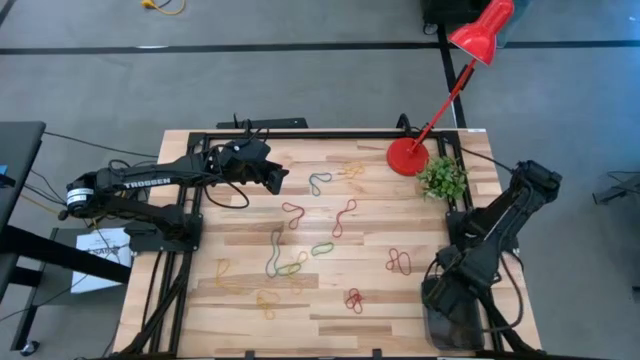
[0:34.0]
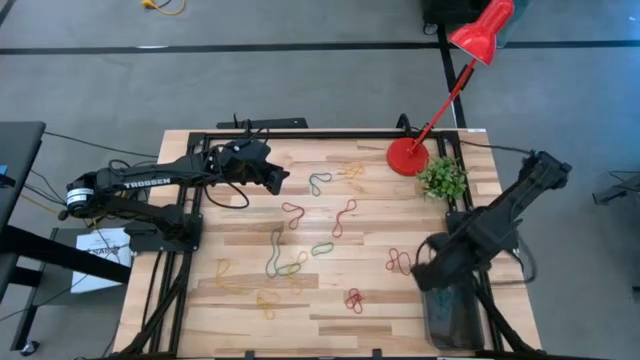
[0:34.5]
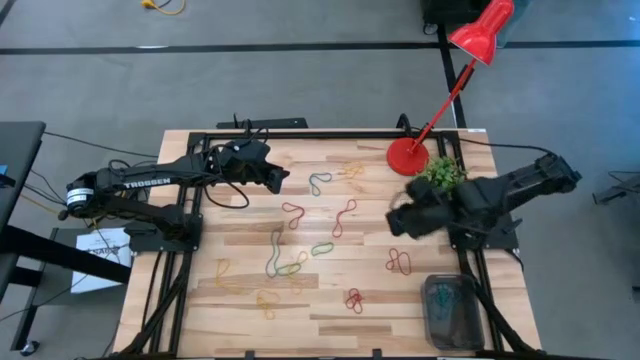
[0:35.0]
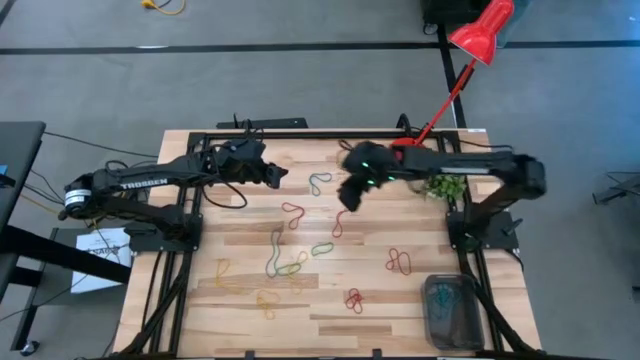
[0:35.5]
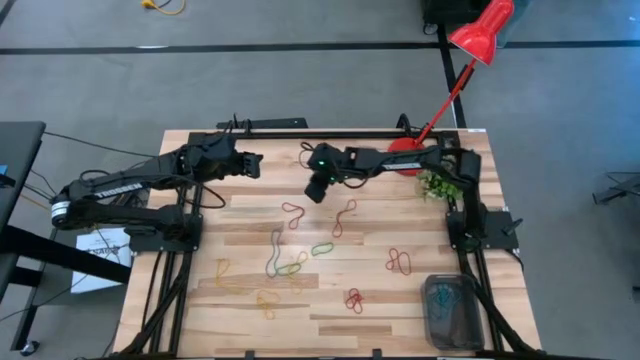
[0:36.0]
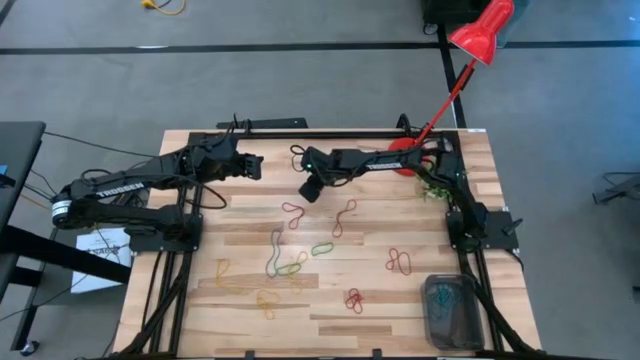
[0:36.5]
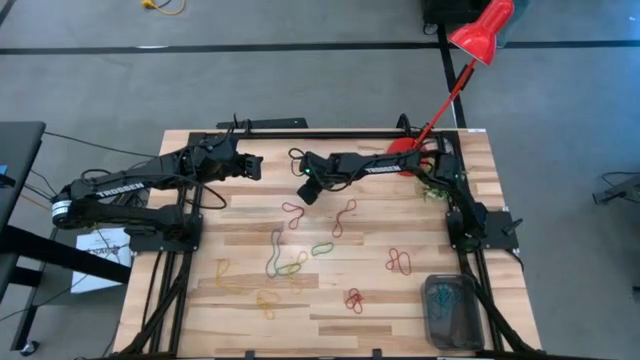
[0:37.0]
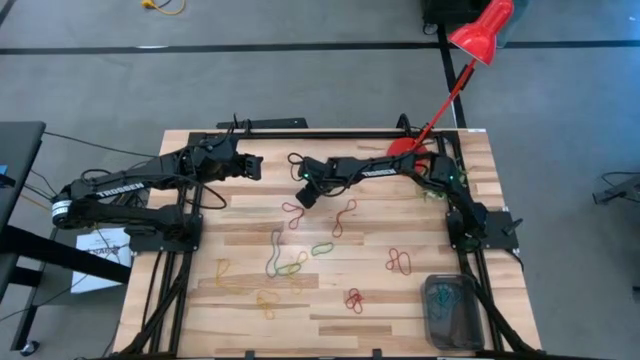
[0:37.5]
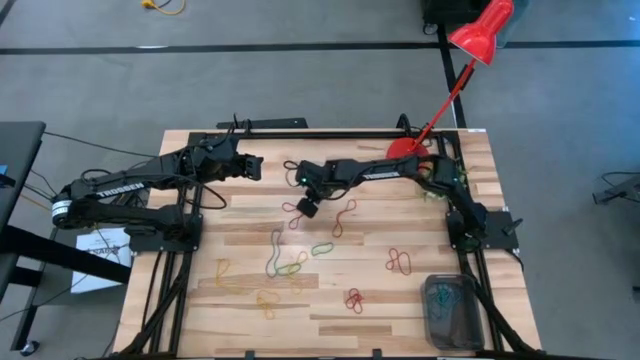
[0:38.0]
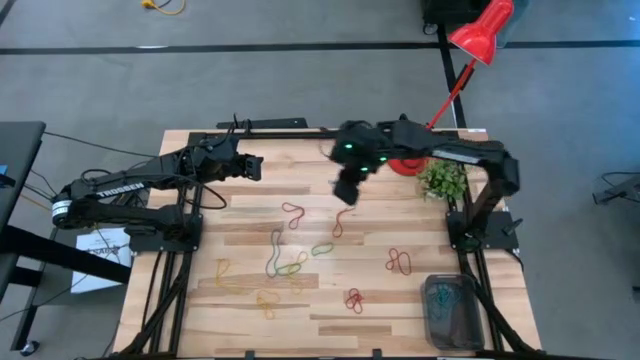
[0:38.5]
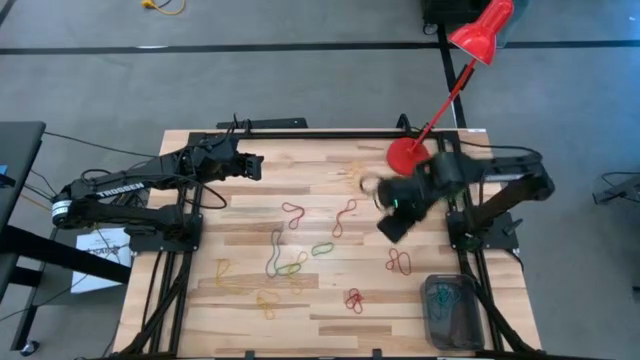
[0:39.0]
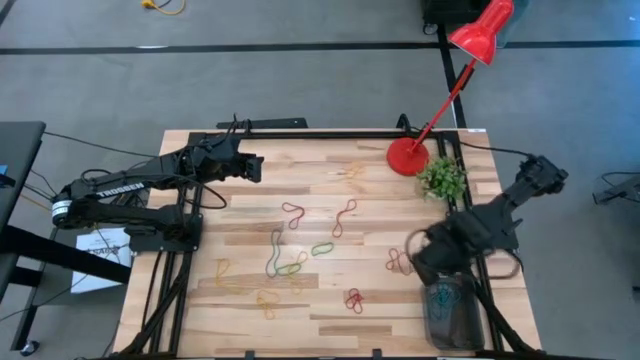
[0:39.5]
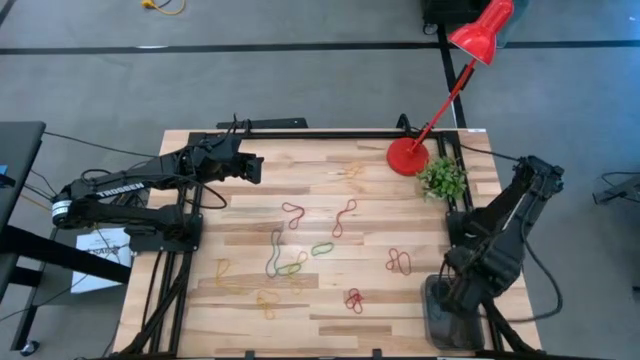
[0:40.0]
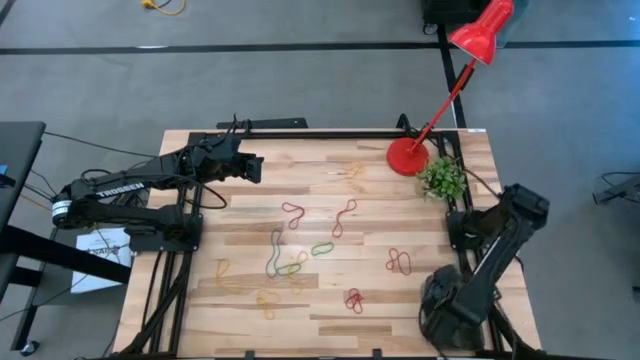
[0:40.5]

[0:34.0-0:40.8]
Task: Pick and place items into bin
Put the blue rubber band into the black bin

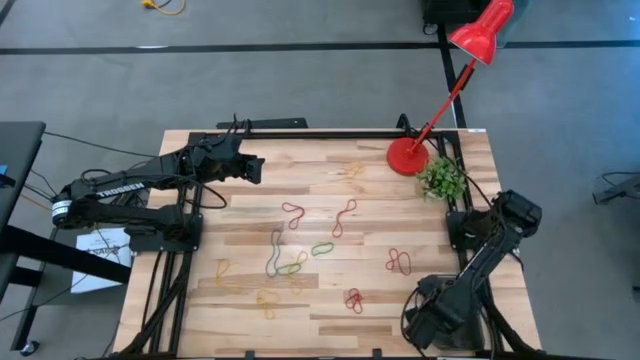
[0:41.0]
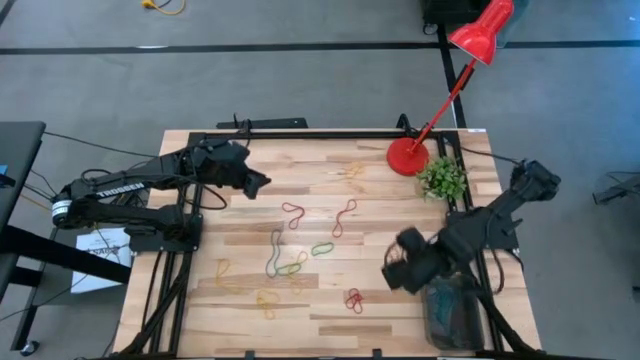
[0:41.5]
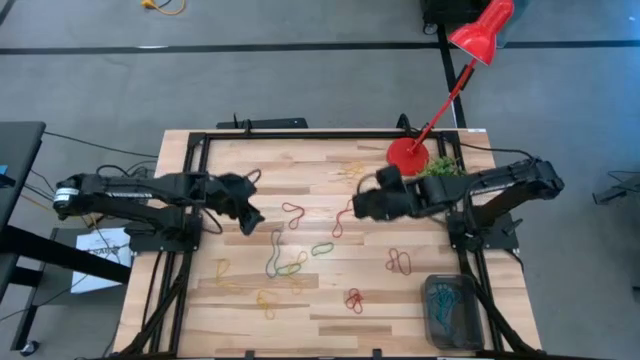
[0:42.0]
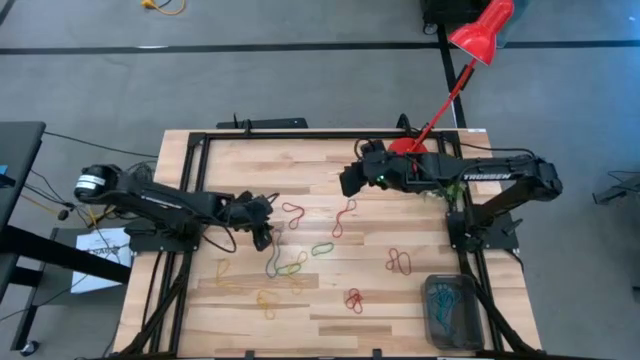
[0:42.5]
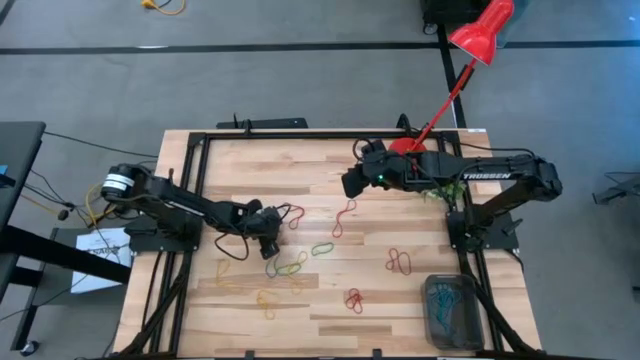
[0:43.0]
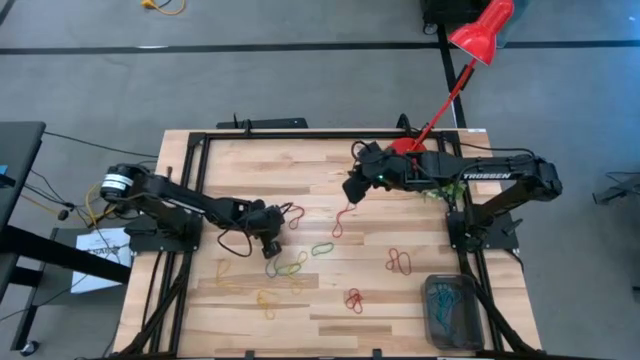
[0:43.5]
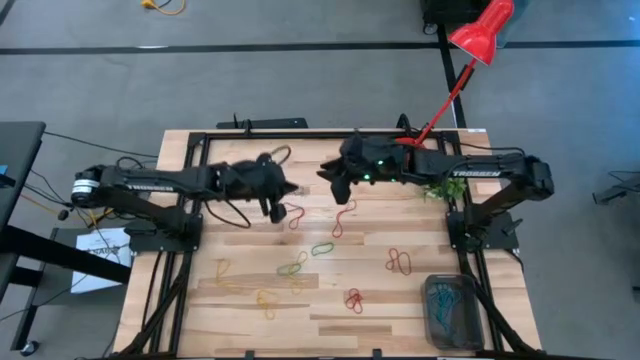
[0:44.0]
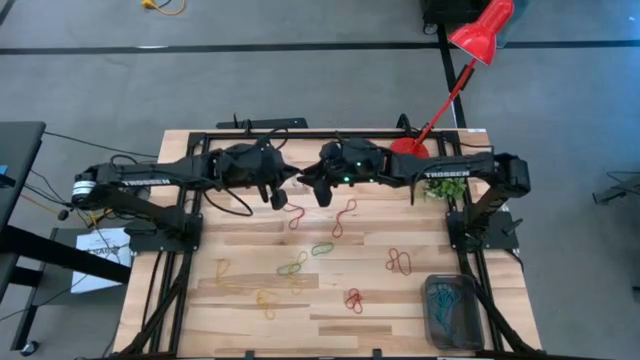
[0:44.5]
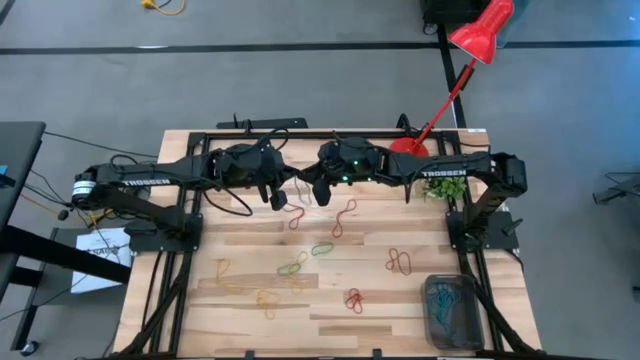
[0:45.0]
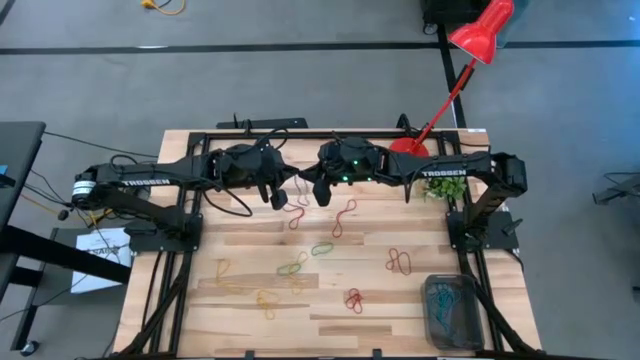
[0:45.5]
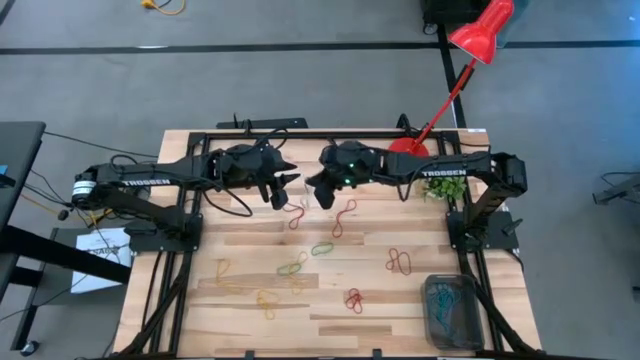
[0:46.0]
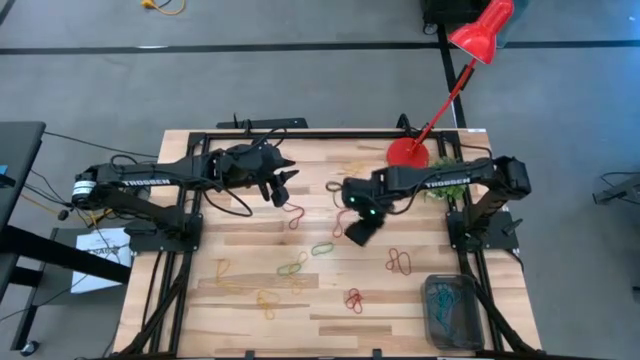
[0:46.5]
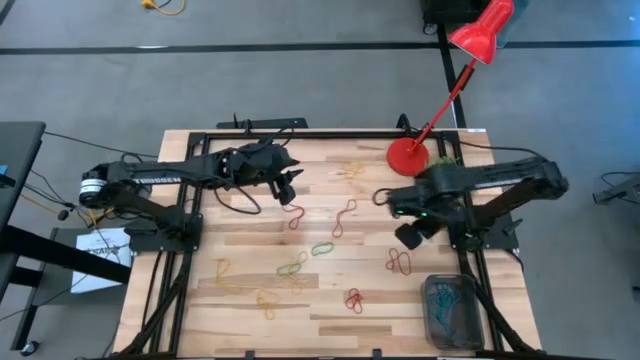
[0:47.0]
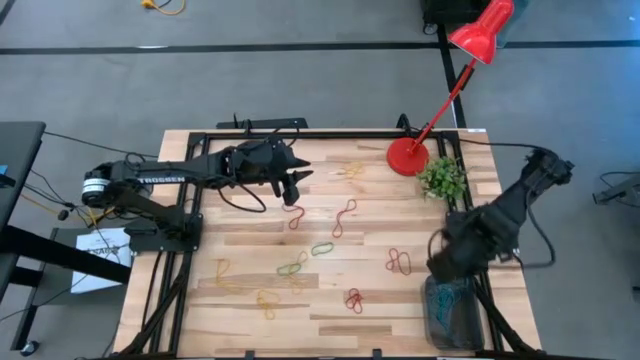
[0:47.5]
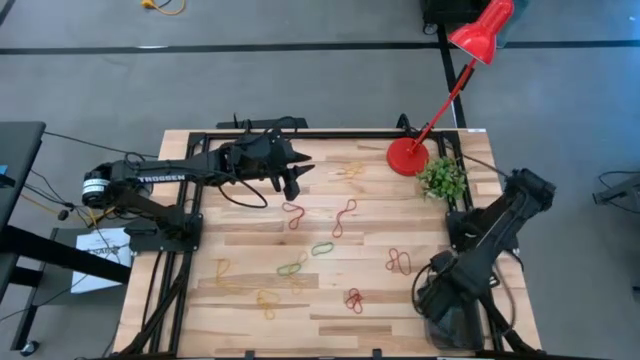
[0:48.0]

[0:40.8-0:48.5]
Put the blue rubber band into the black bin

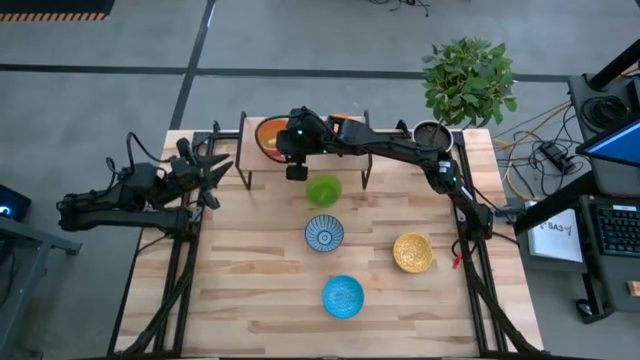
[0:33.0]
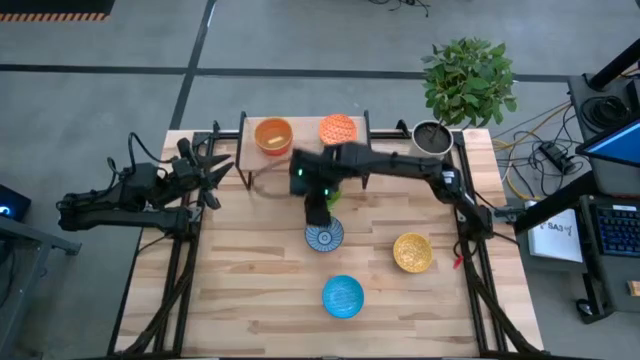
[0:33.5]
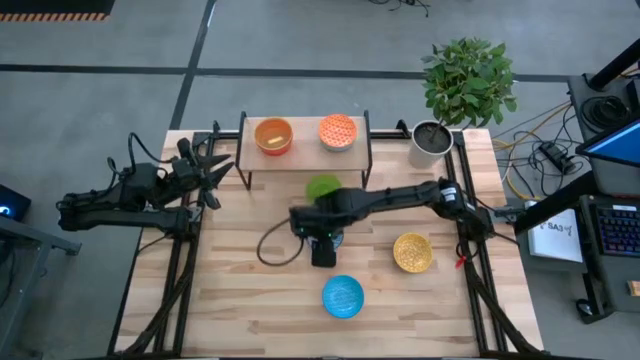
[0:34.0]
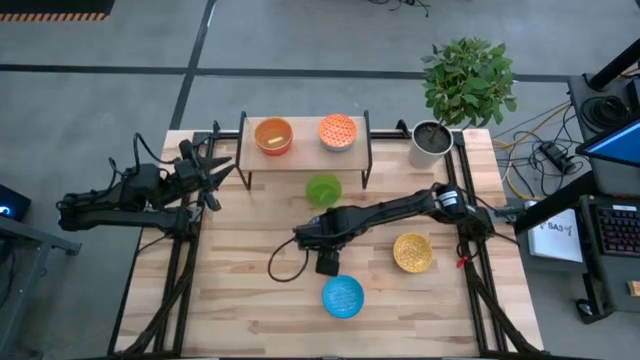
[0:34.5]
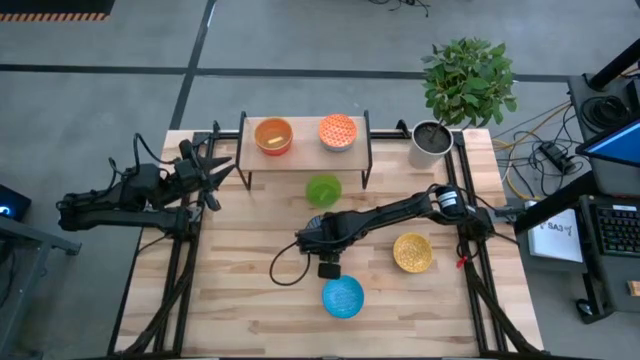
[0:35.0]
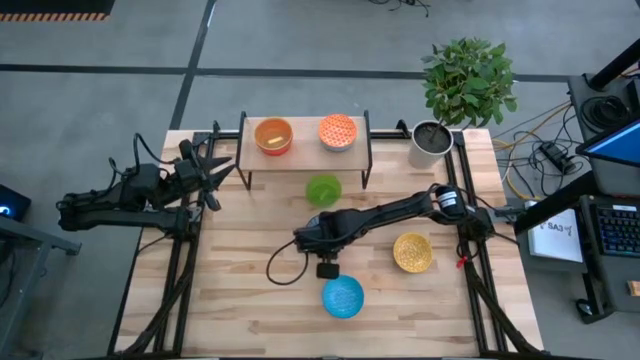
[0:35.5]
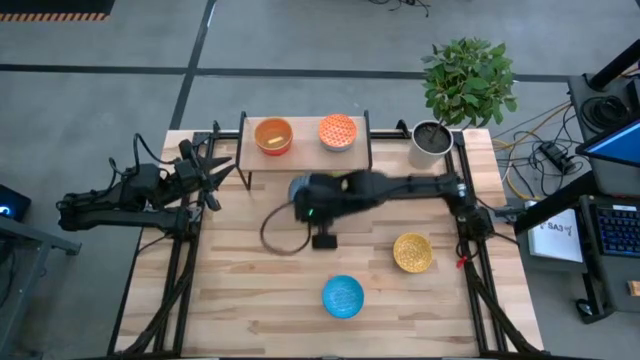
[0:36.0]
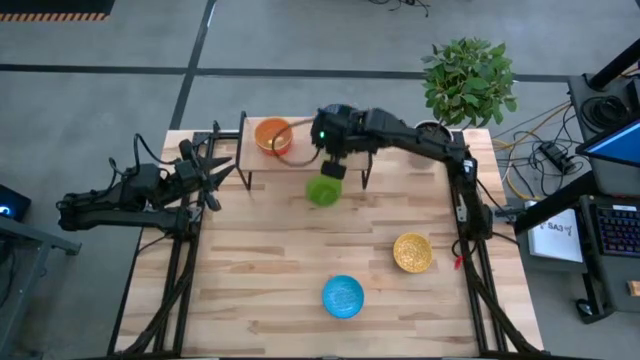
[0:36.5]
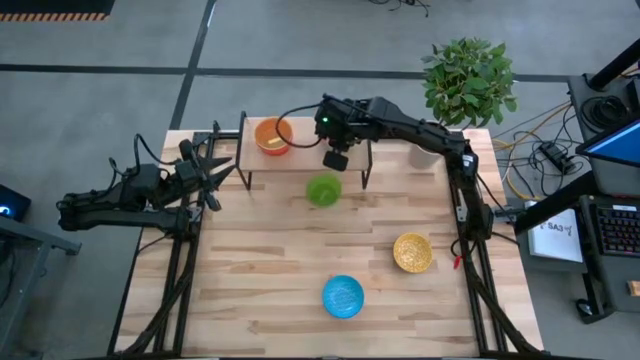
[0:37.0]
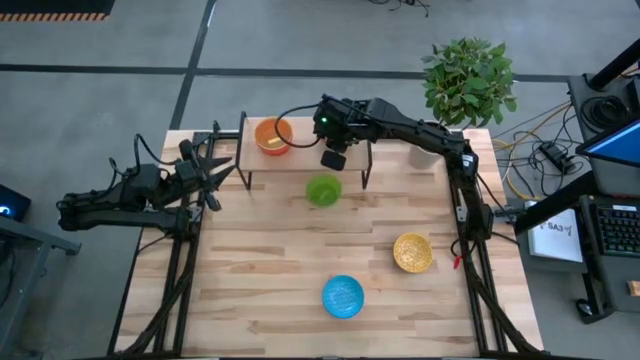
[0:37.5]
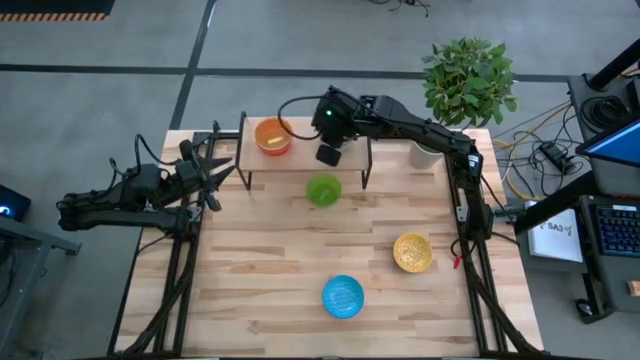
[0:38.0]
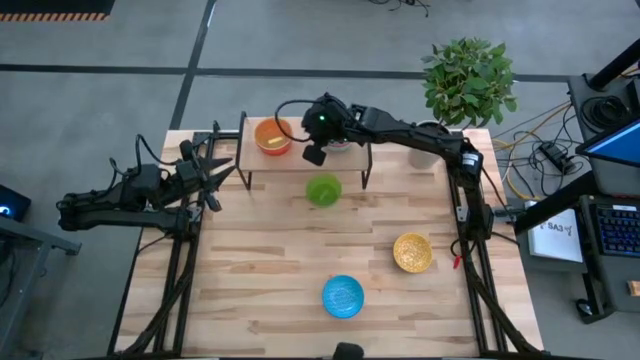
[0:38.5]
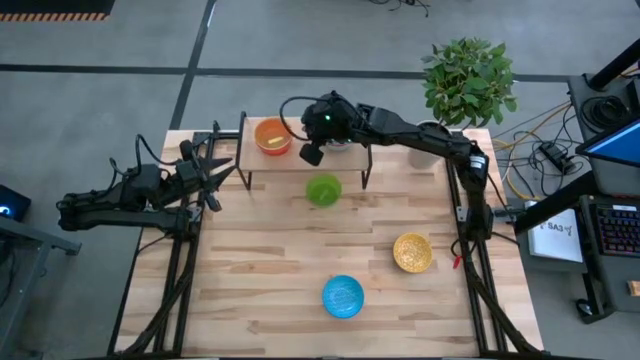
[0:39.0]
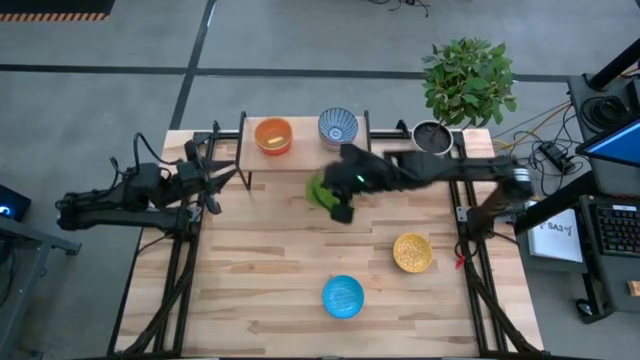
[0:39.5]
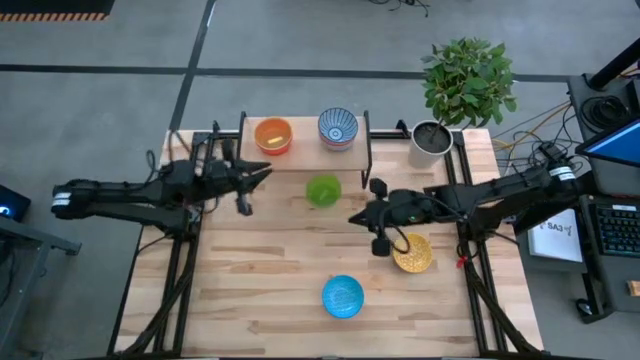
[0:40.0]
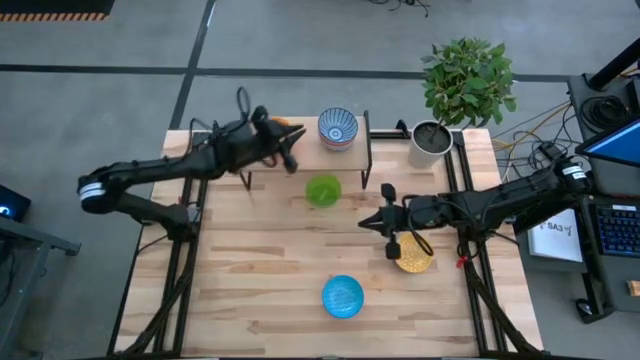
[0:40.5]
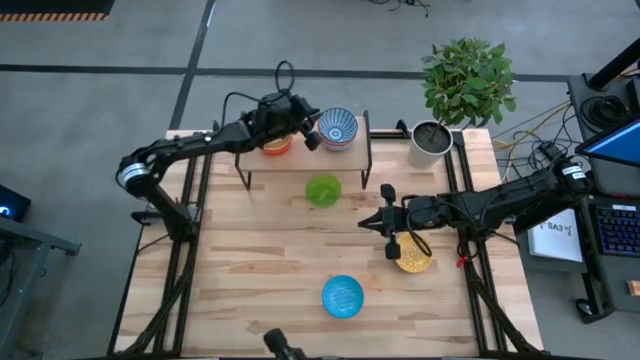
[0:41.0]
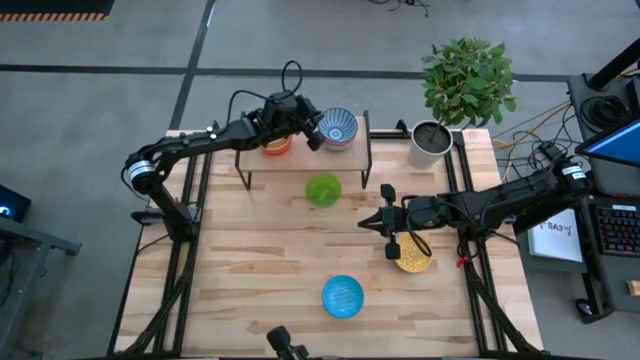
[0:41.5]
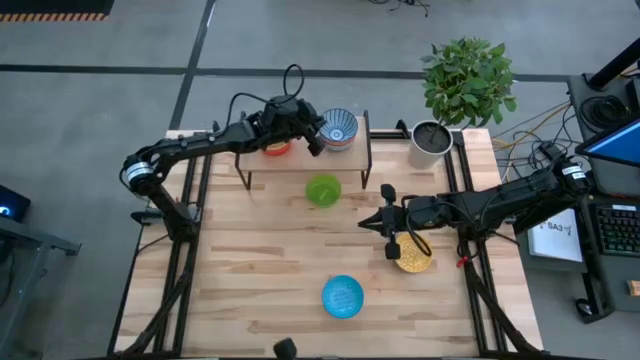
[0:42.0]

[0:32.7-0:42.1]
Task: Place and stack bowls onto a shelf
Stack the blue patterned bowl on top of the orange patterned bowl on the shelf
